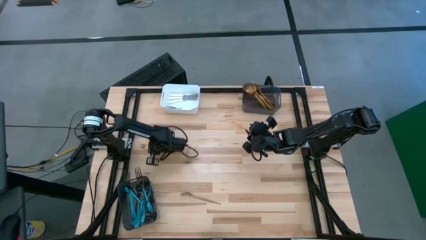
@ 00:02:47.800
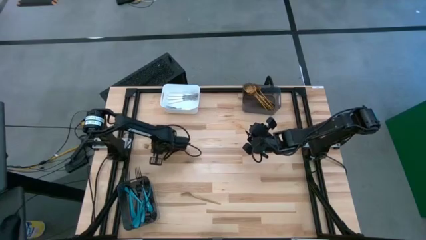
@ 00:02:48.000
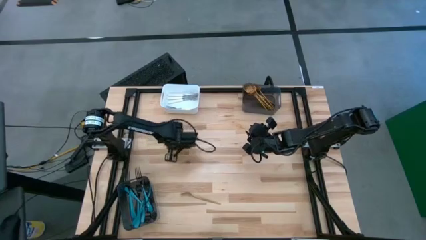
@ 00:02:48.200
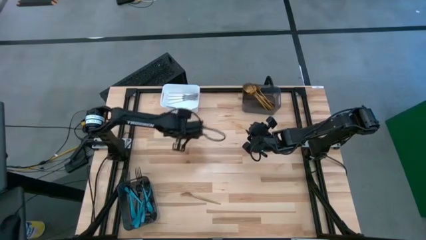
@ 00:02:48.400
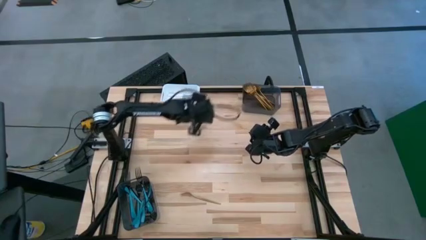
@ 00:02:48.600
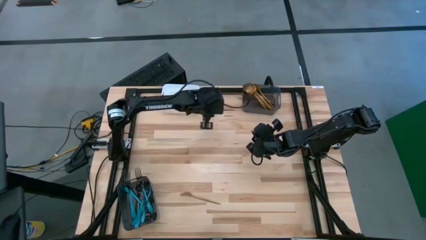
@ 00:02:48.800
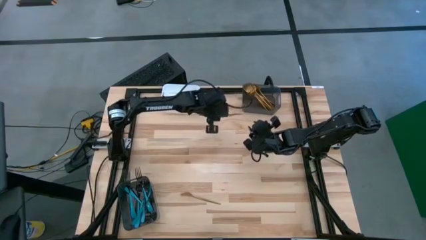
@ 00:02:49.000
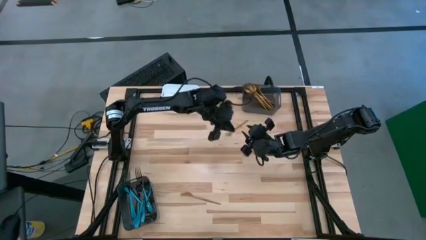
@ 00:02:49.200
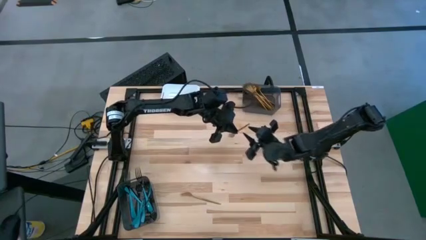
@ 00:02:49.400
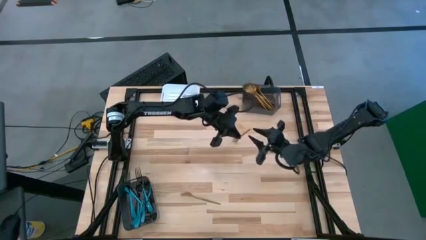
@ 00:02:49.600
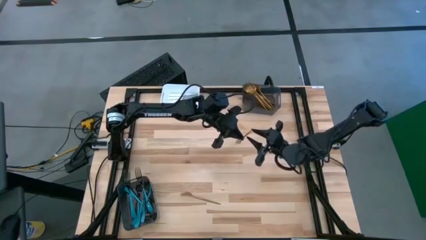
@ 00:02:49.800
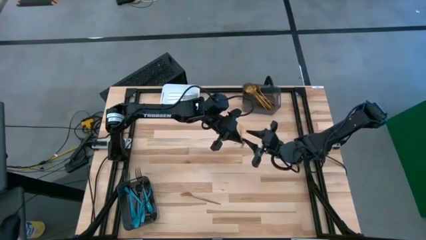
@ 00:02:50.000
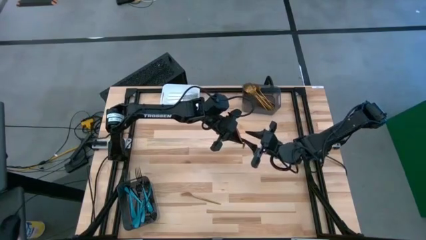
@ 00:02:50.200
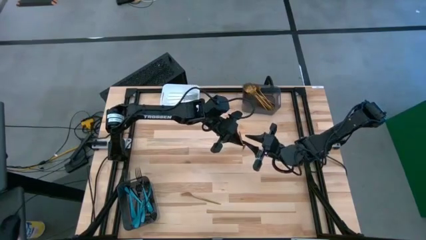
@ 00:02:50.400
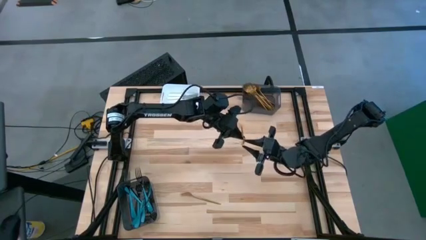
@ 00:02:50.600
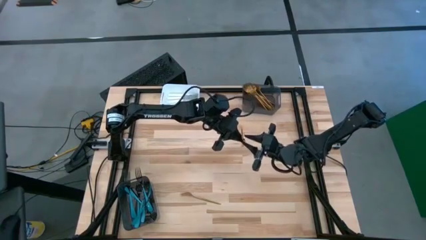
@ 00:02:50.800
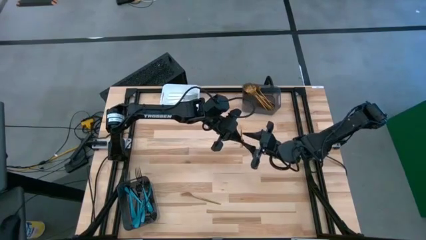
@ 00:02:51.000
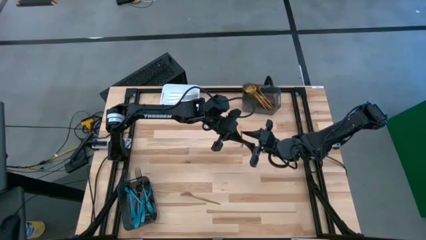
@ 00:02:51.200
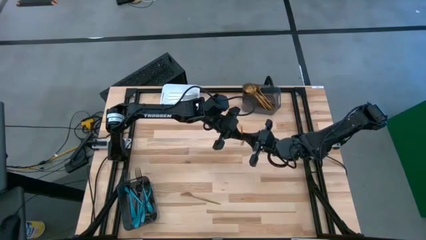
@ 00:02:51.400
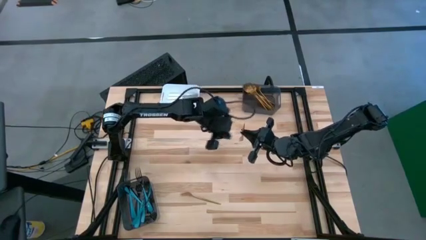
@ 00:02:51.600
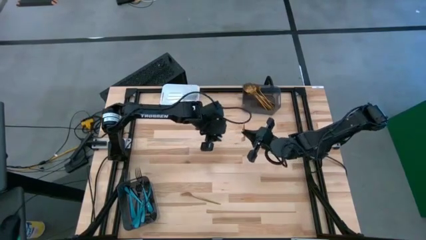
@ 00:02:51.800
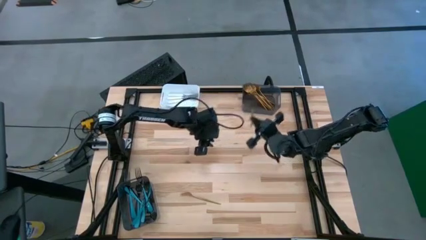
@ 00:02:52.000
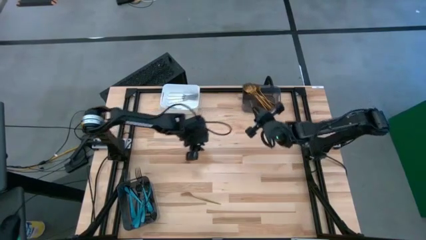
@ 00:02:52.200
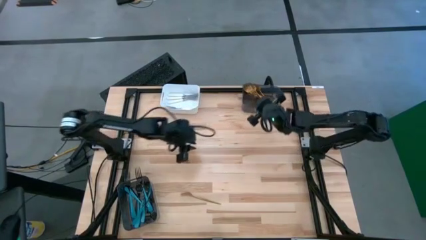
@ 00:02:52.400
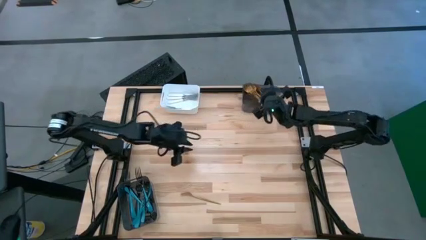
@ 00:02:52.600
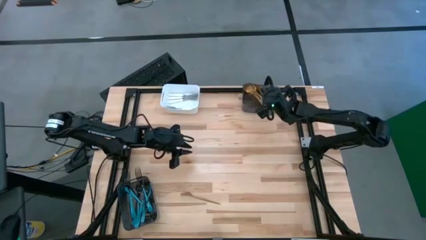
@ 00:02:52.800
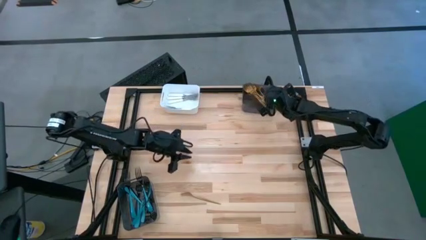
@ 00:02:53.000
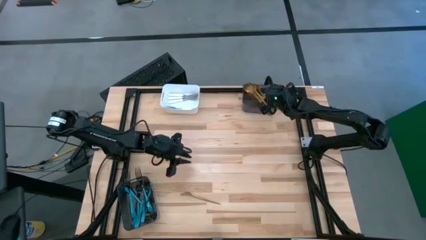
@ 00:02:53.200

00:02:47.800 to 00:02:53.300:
Task: Sort silverware by color (type)
Put the gold fork into the top black bin

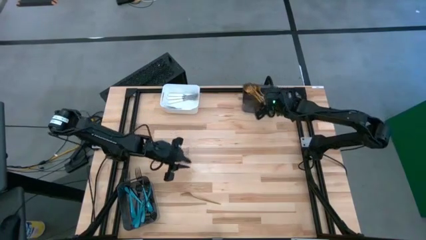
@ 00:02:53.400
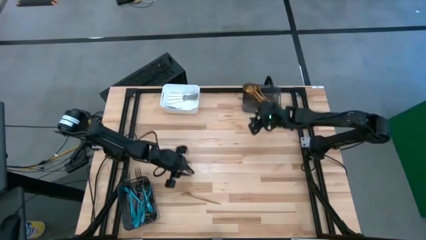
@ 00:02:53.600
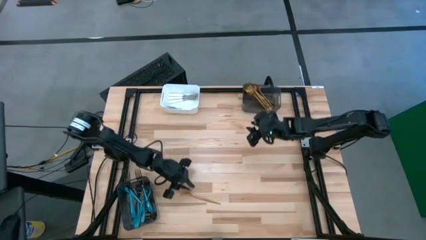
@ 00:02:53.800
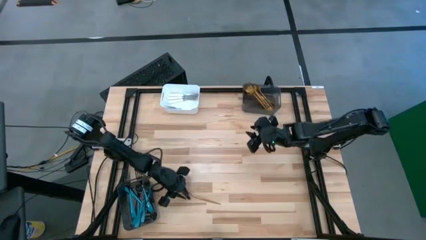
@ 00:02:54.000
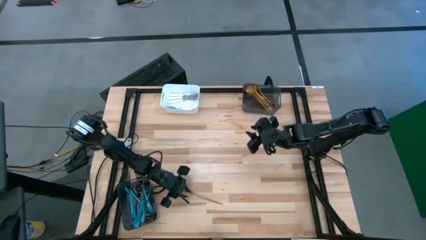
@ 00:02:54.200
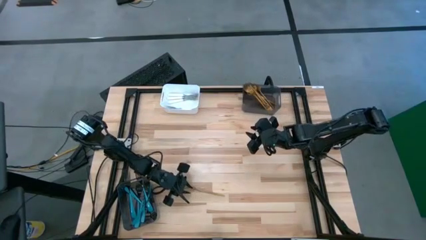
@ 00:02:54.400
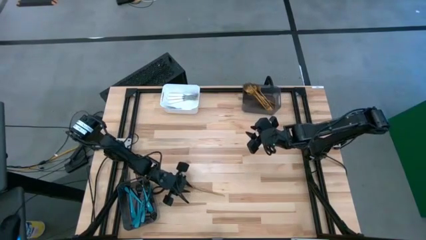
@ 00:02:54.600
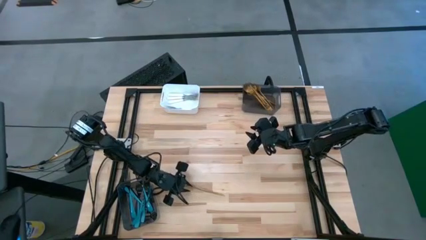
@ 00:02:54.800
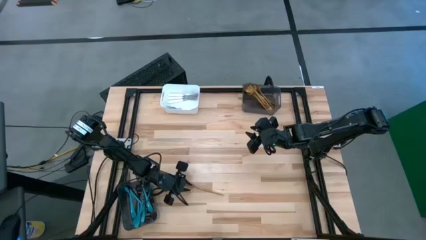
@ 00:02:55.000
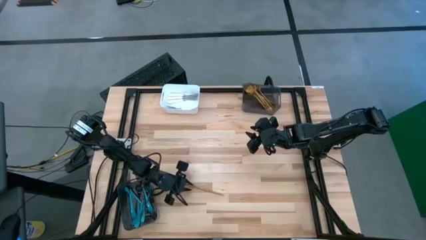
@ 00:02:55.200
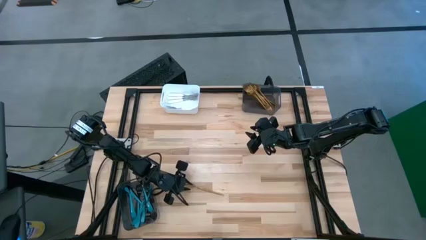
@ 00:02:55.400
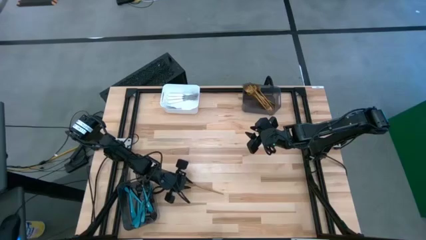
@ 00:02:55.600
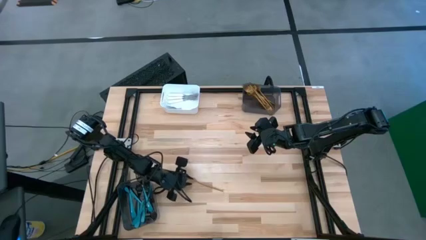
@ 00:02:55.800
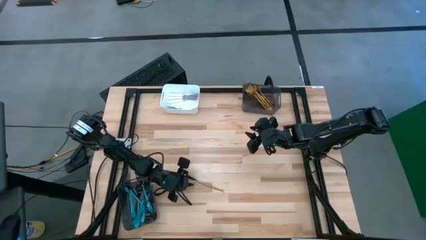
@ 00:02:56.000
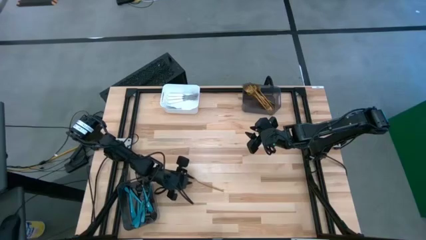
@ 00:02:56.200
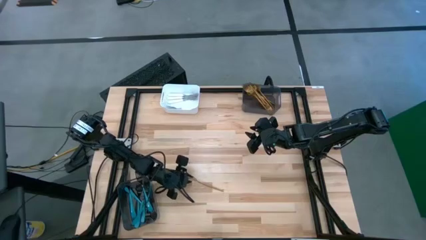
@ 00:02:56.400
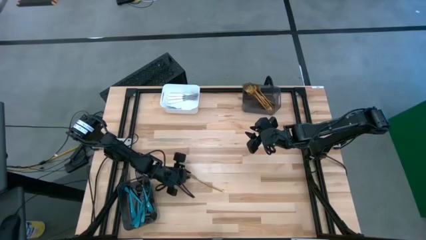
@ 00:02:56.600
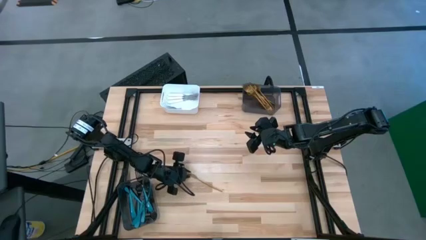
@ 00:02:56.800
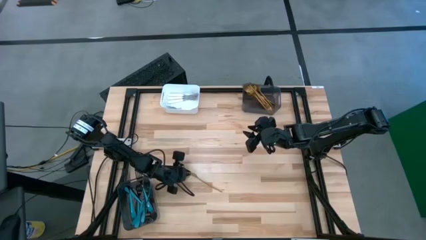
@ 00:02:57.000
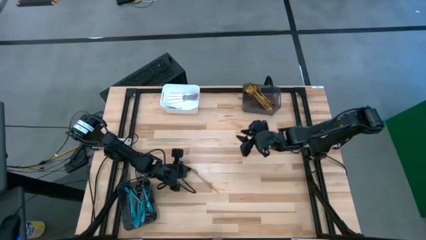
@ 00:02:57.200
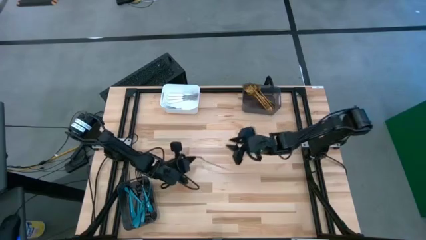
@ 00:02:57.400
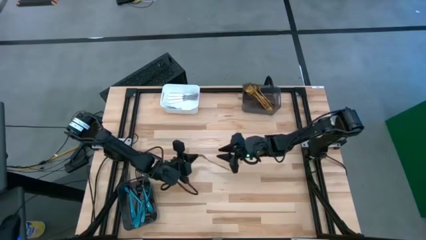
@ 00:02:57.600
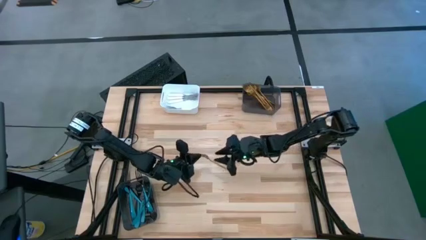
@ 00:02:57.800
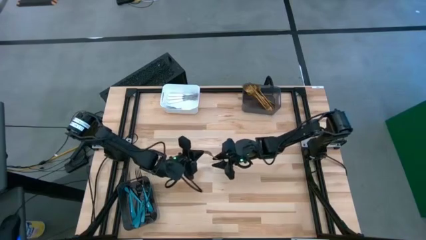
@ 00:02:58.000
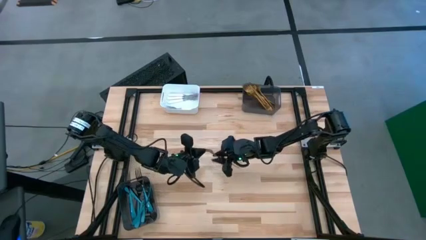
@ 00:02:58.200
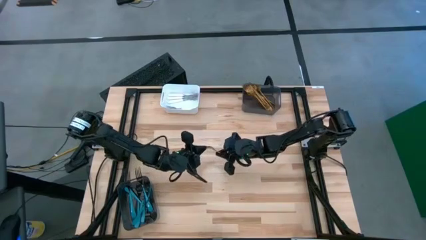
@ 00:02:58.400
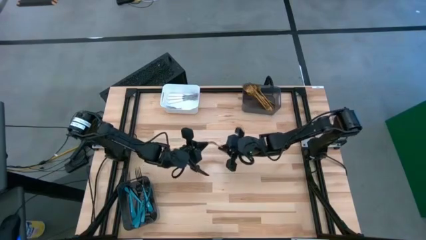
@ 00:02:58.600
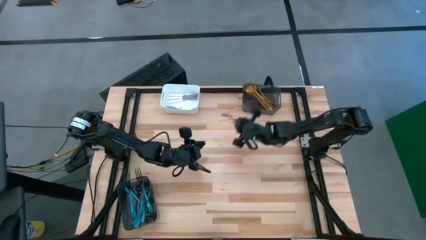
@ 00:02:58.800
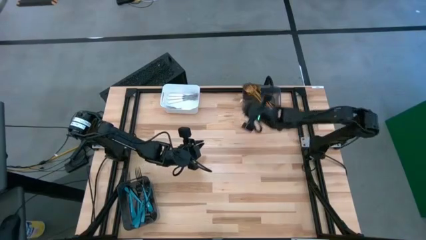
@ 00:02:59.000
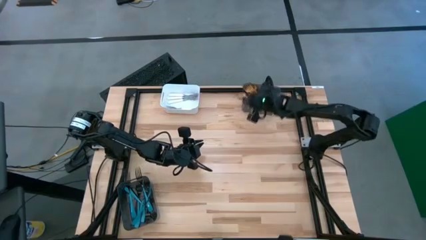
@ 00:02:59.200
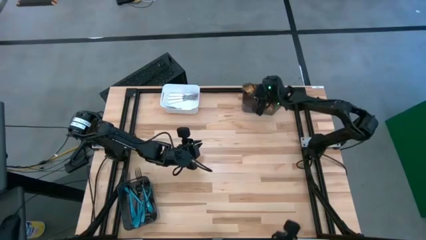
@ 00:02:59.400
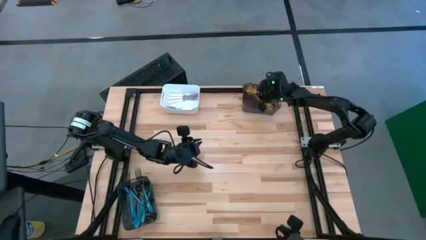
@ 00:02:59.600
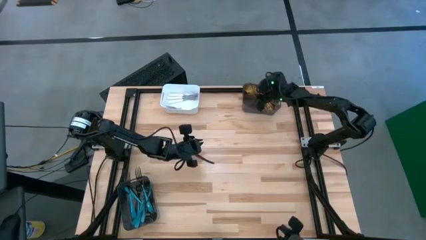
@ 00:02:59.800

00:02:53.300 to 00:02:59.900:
Put the gold fork into the top black bin

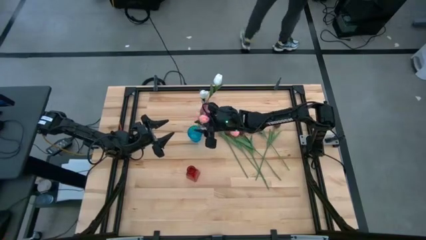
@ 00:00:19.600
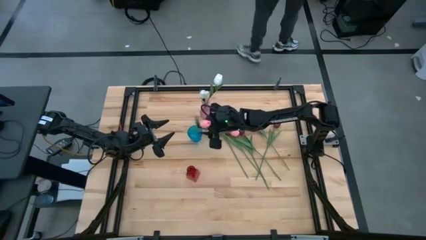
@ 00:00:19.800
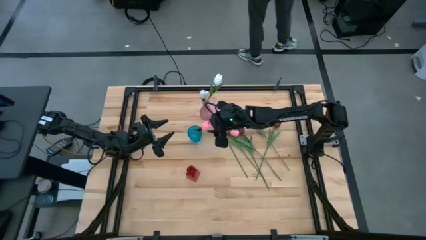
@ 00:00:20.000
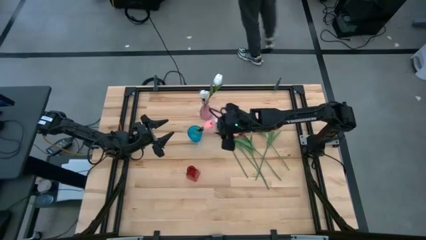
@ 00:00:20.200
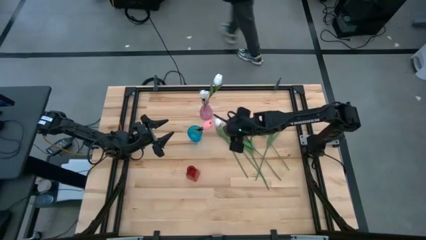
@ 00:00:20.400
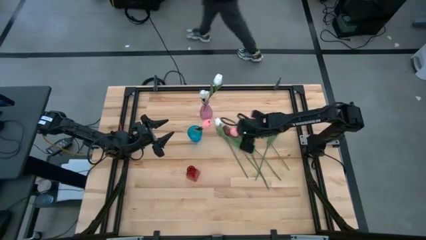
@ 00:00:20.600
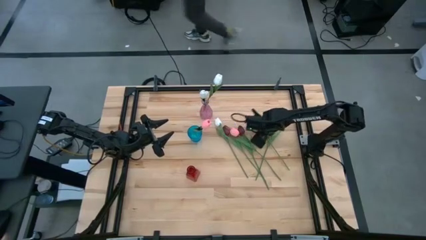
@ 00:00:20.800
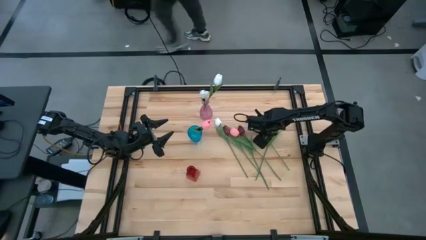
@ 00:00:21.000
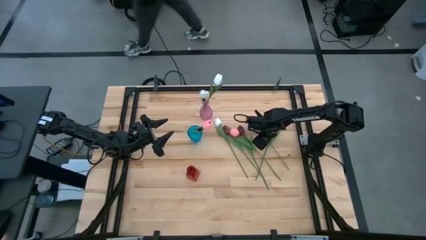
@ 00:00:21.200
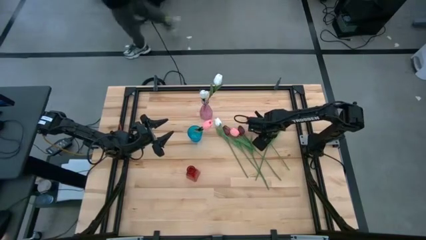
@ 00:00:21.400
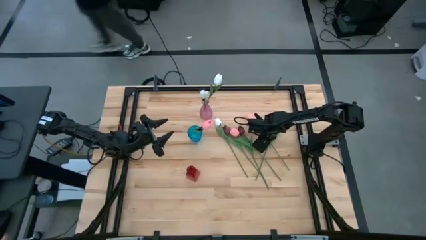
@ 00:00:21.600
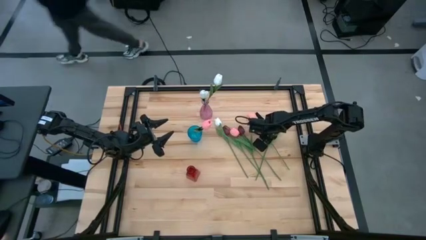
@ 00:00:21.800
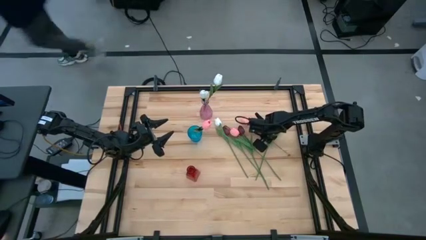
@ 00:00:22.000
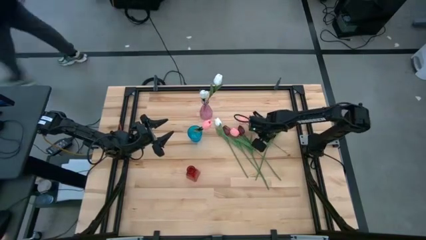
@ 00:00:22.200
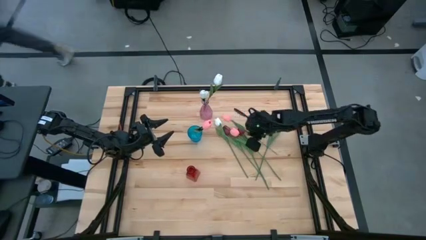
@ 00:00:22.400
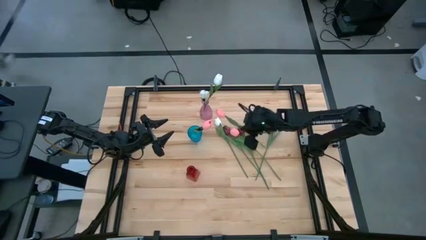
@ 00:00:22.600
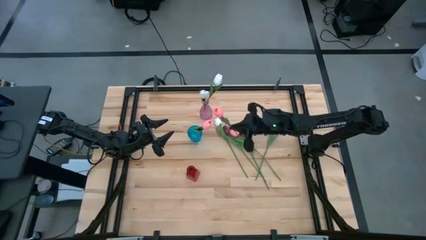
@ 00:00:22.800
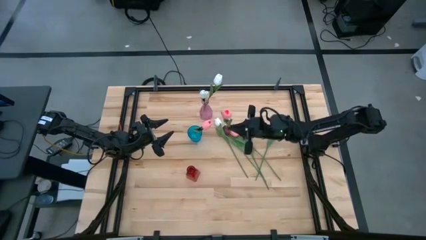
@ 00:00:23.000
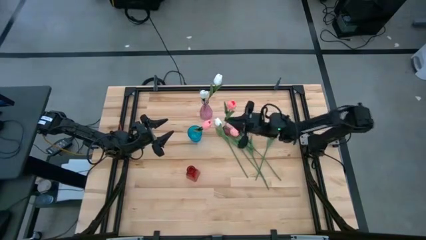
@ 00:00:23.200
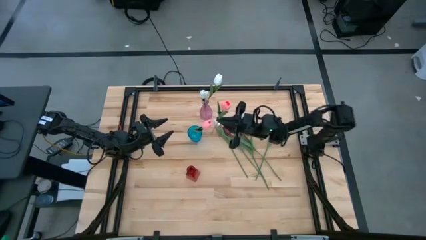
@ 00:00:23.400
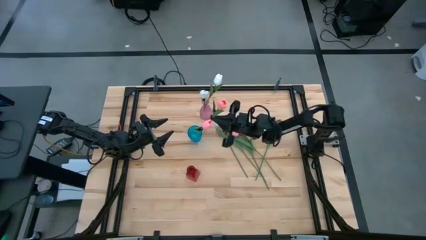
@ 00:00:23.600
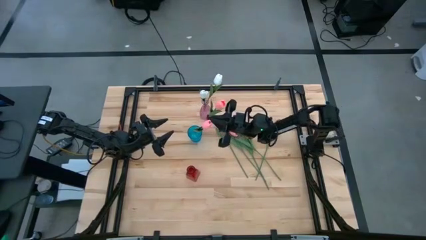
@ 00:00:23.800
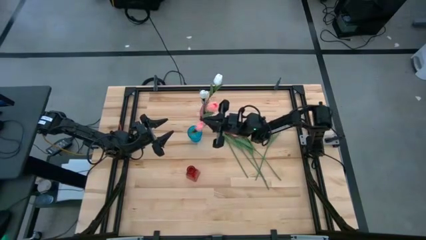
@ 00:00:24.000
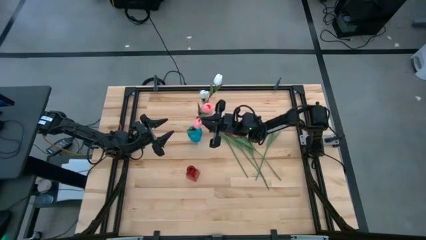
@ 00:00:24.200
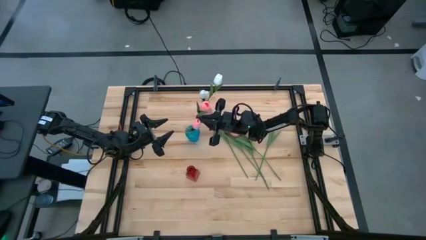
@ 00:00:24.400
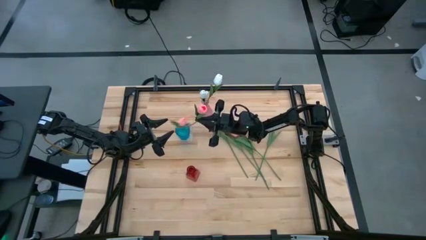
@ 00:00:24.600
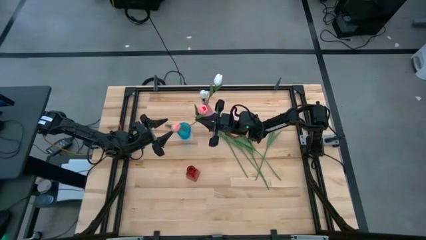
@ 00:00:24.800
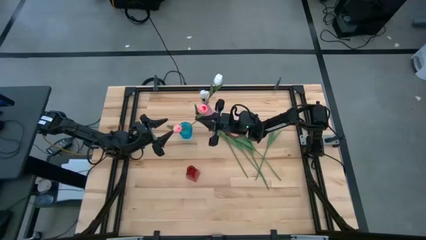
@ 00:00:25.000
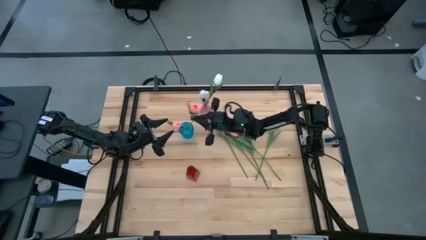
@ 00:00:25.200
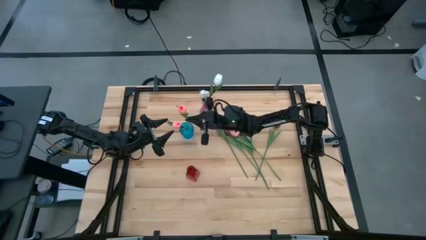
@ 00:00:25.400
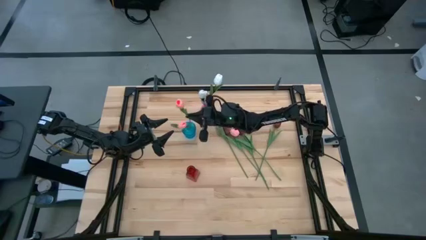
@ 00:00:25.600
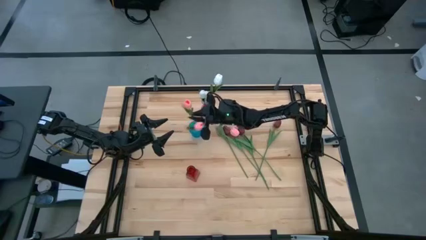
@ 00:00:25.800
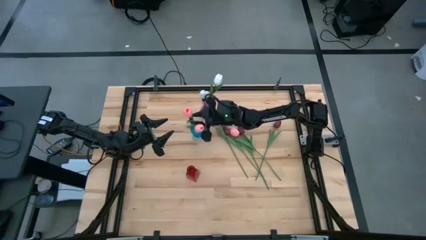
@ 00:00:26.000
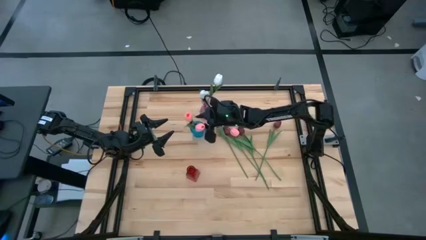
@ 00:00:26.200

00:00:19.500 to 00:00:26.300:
Task: Sort flowers into vase by color
Put the top pink flower into the blue vase
